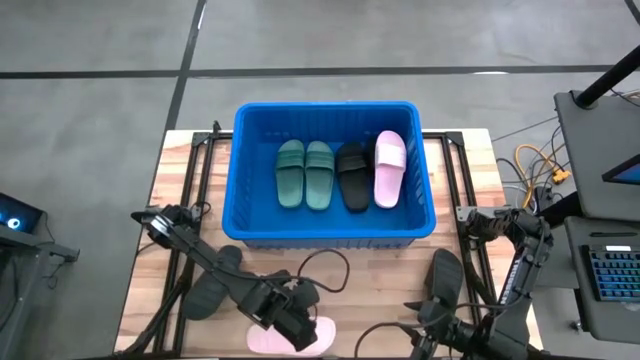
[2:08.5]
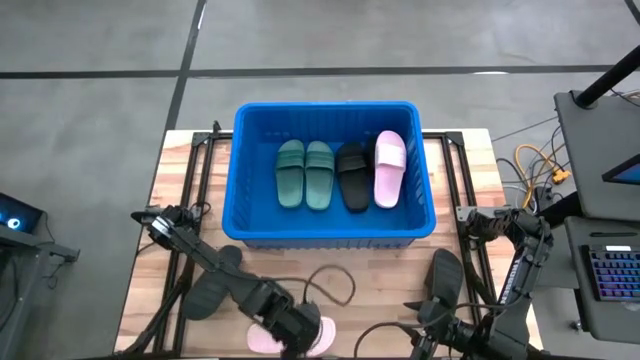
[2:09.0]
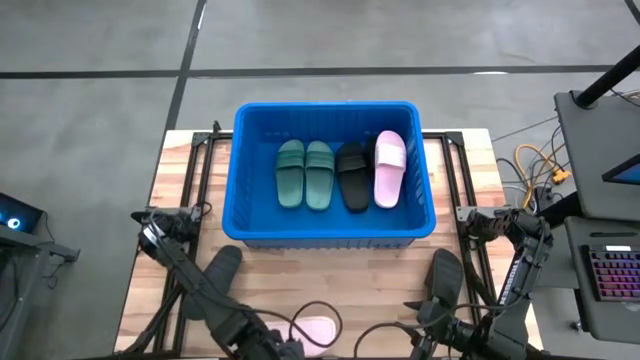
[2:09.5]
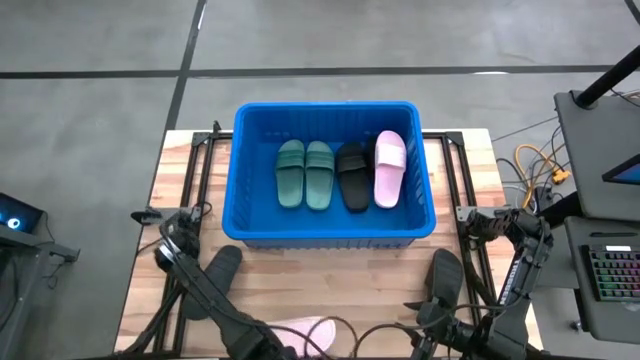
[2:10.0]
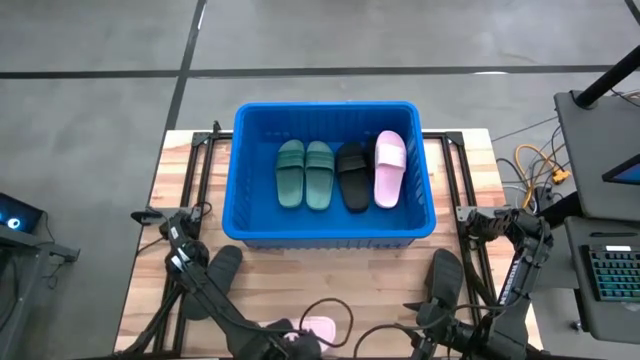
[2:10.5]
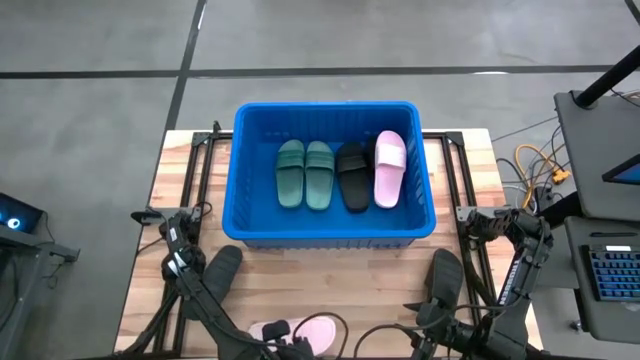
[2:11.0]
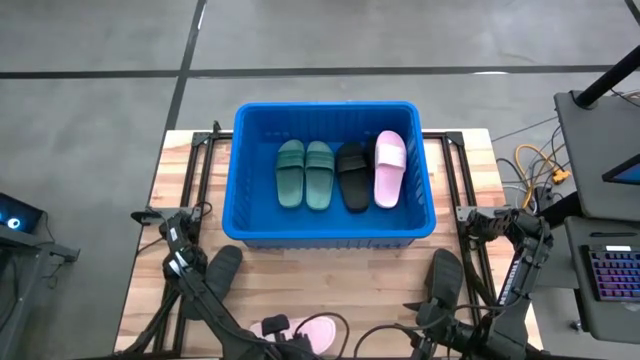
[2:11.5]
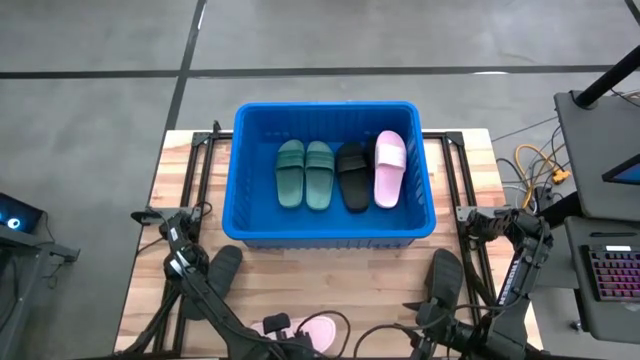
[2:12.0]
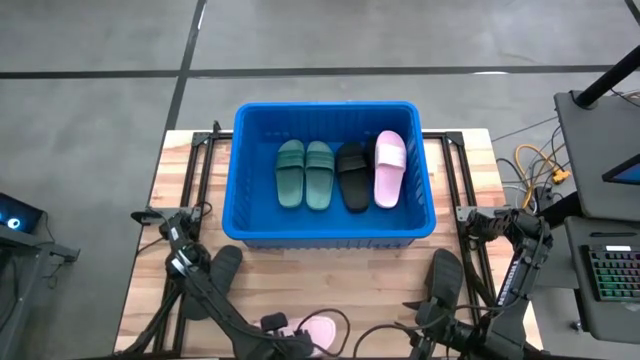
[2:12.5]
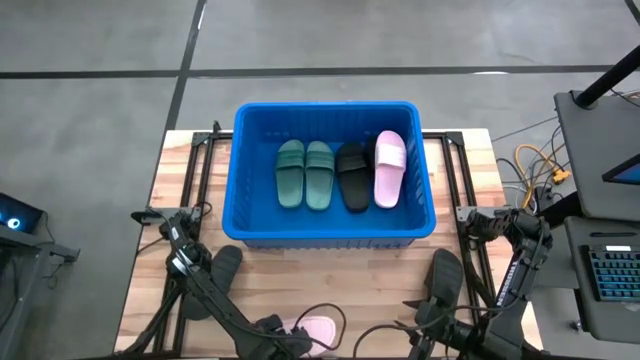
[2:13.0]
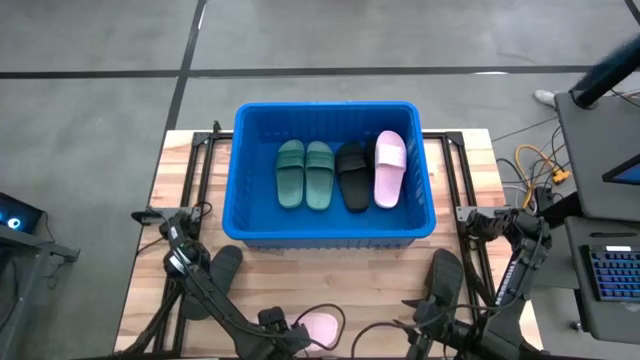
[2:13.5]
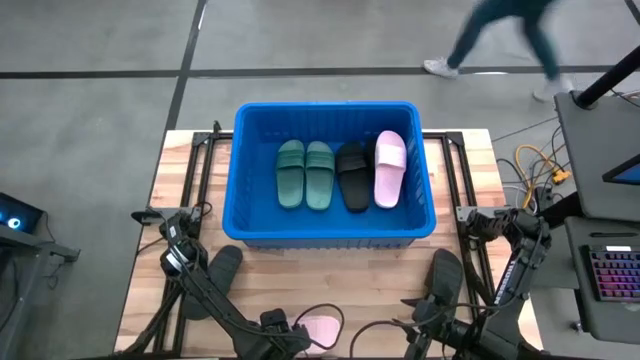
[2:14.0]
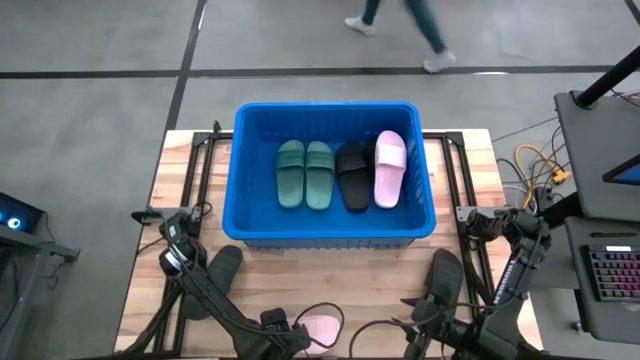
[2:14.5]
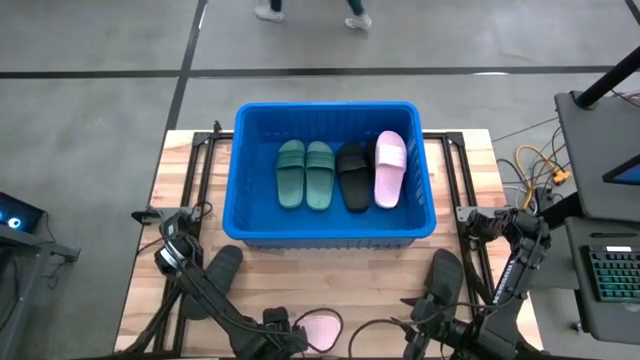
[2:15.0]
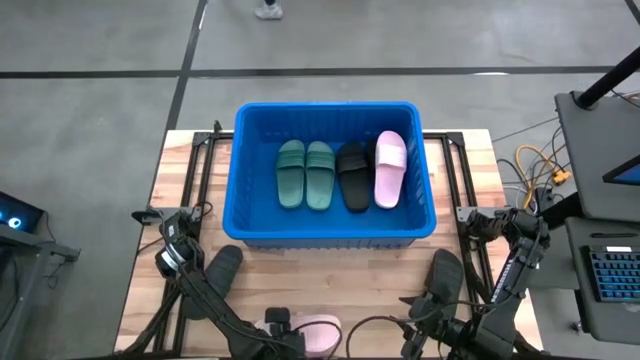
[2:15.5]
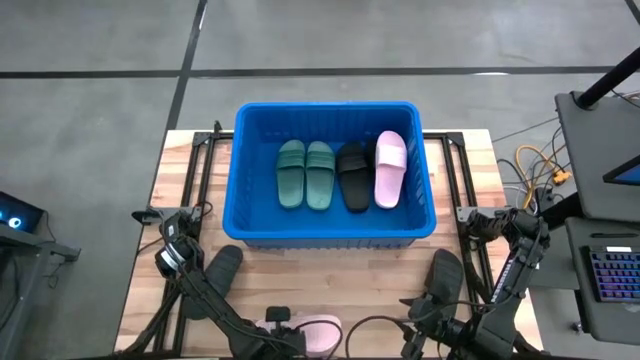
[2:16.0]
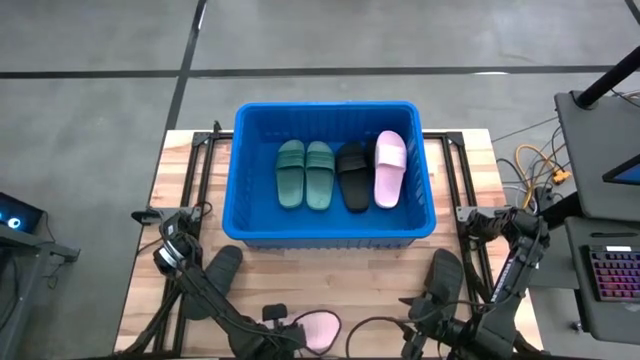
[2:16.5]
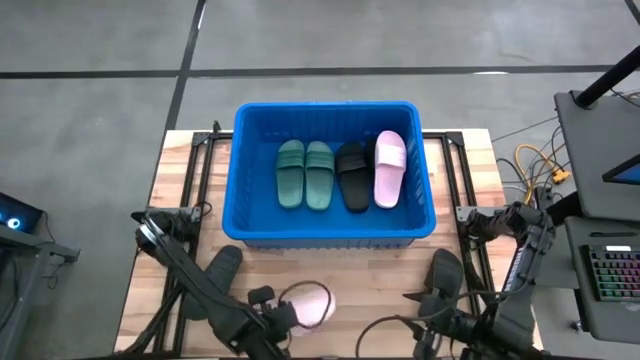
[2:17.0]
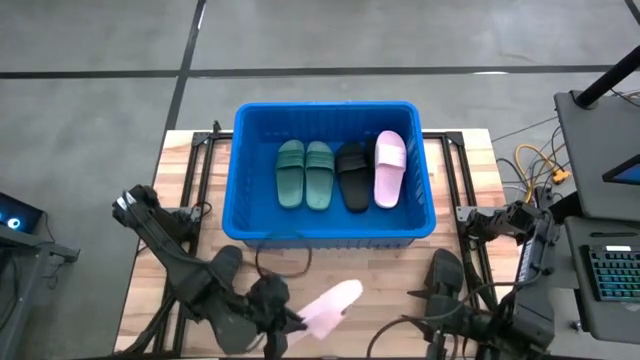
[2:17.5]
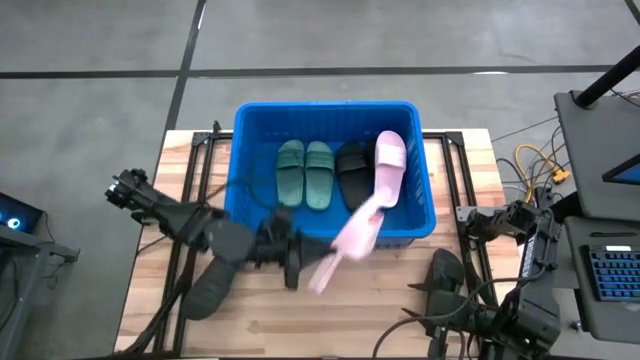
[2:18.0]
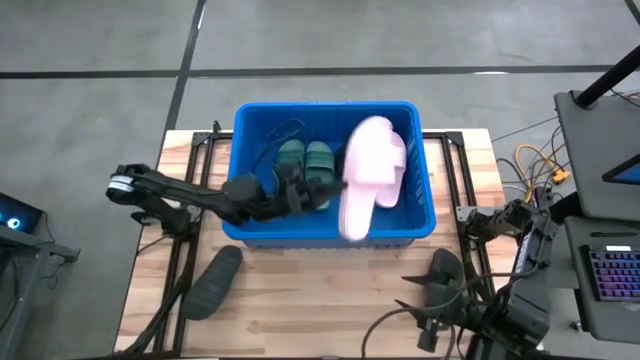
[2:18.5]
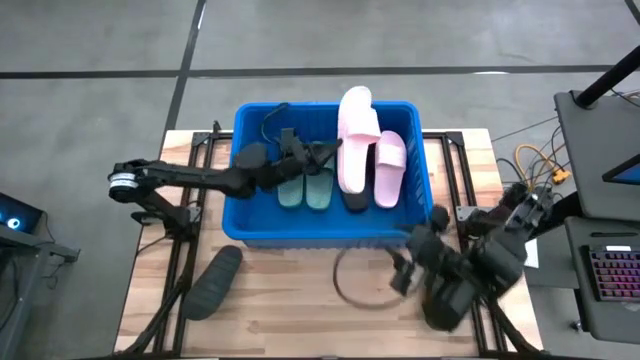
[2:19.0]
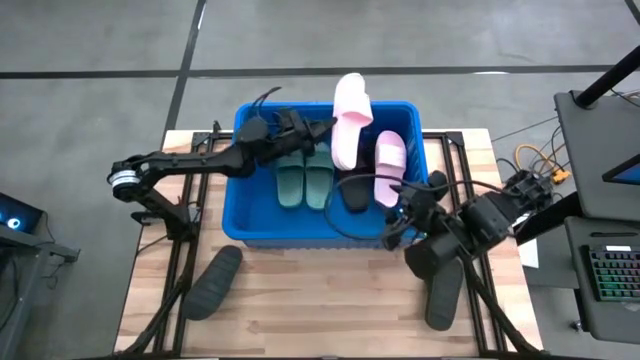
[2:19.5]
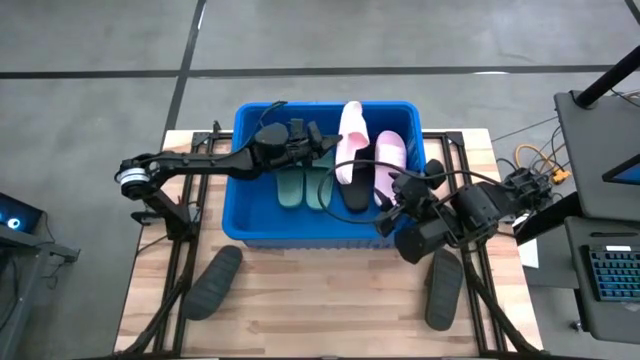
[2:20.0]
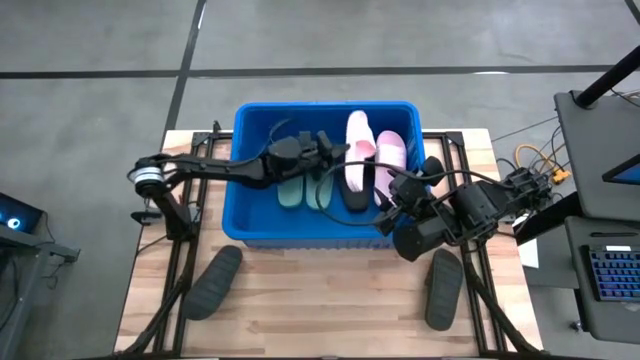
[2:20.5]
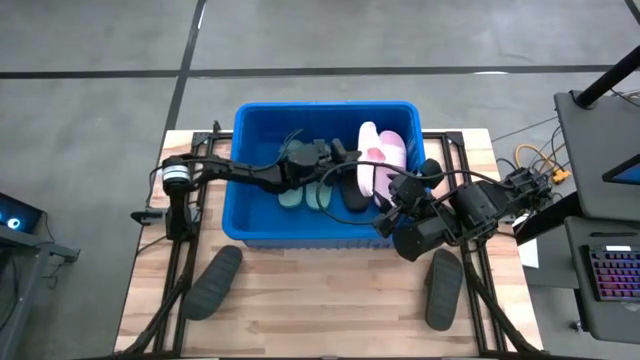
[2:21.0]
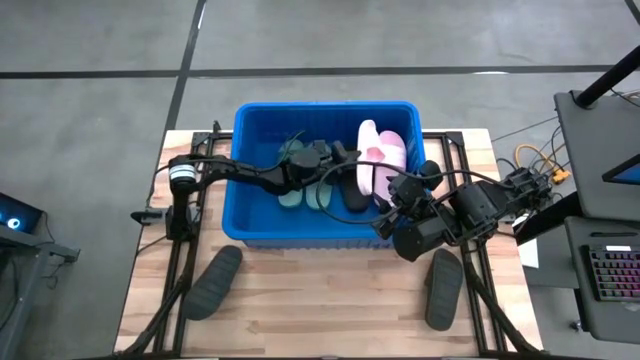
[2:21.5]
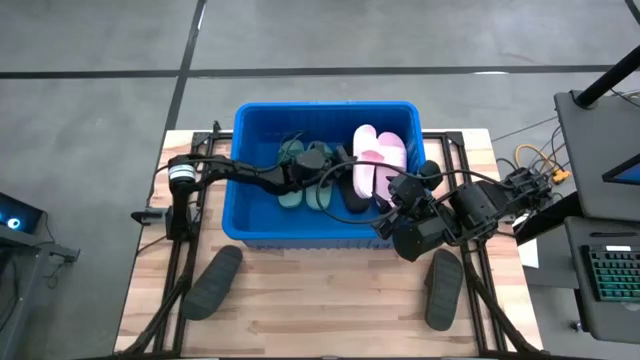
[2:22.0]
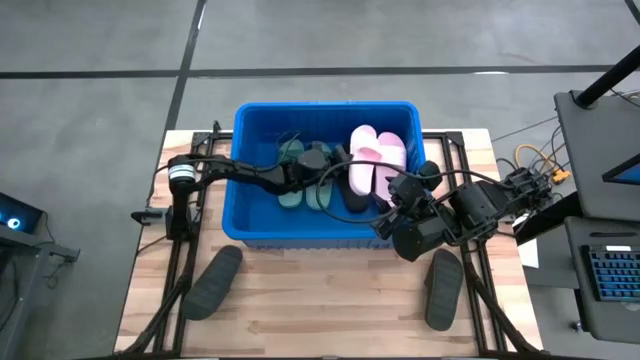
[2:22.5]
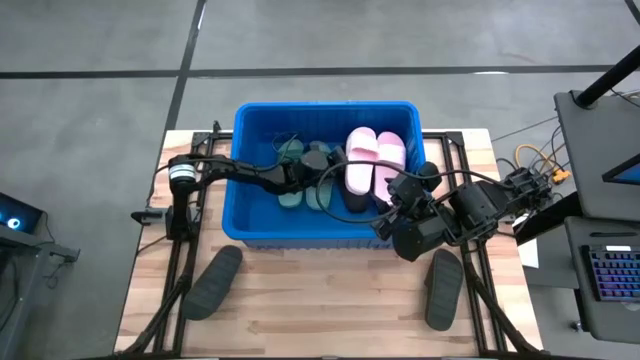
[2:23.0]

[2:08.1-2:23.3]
Task: Pick and place slides into bin
Put the pink slide into the bin

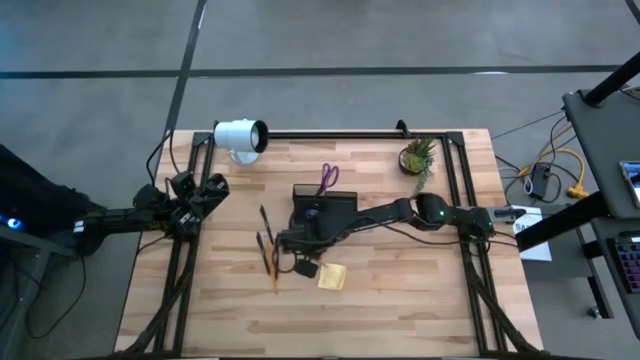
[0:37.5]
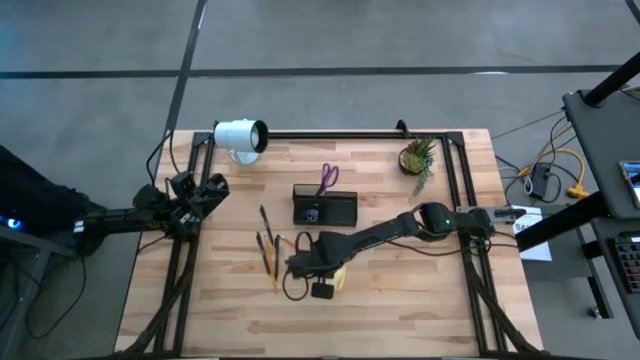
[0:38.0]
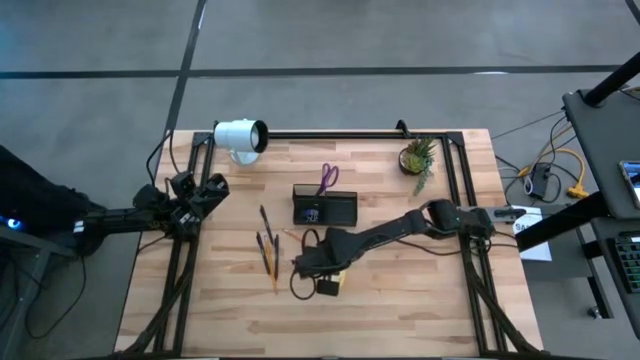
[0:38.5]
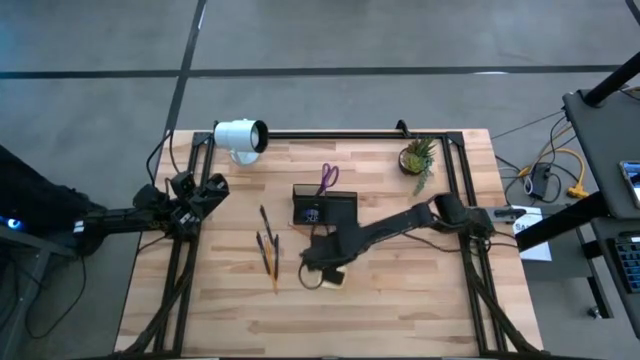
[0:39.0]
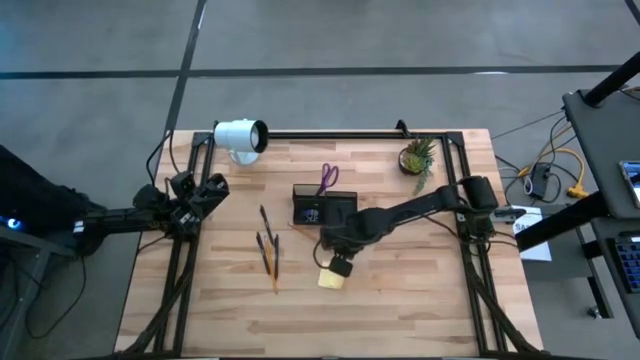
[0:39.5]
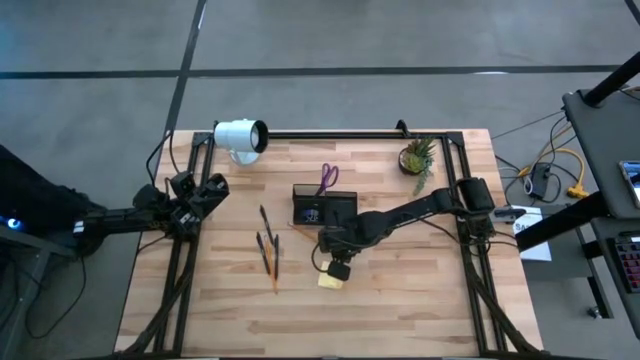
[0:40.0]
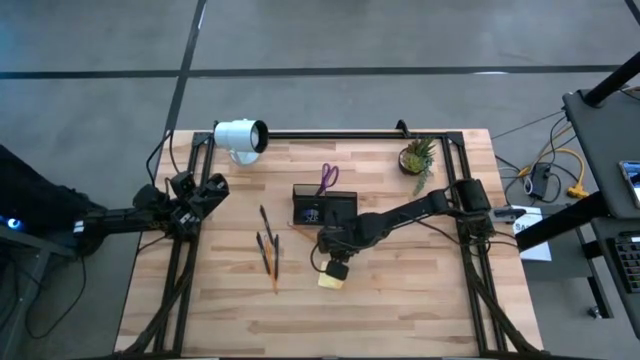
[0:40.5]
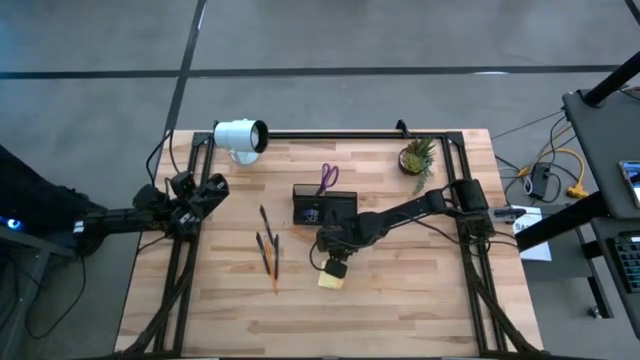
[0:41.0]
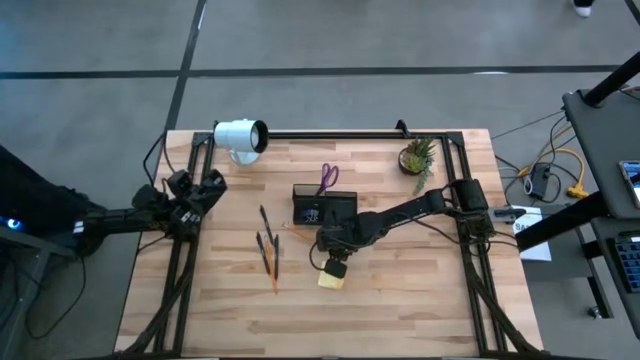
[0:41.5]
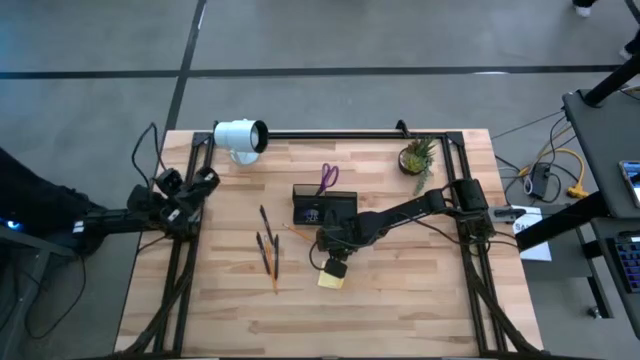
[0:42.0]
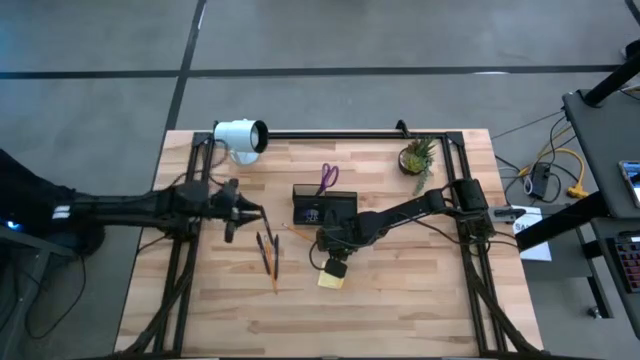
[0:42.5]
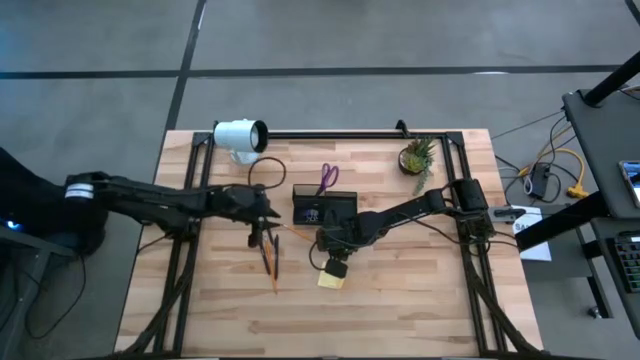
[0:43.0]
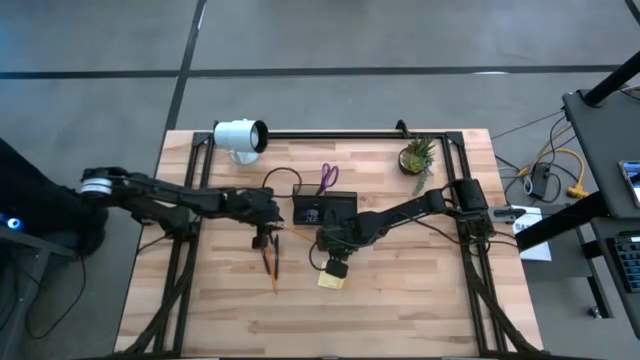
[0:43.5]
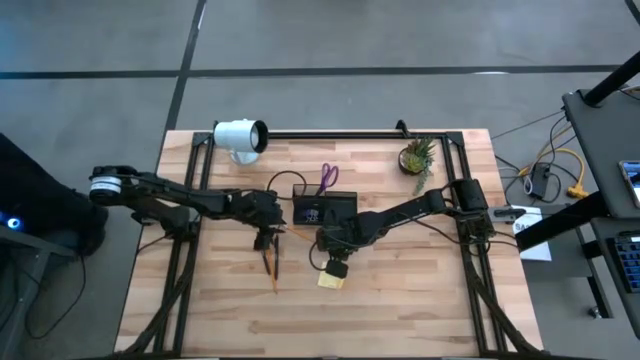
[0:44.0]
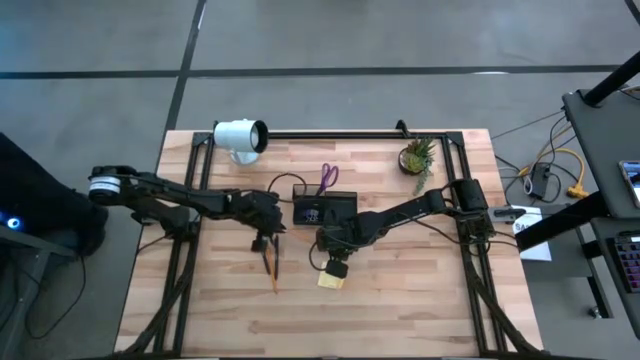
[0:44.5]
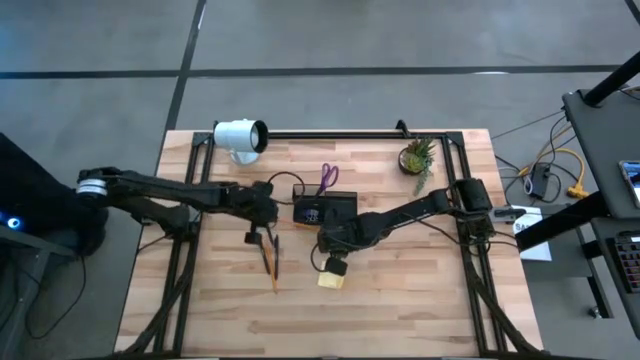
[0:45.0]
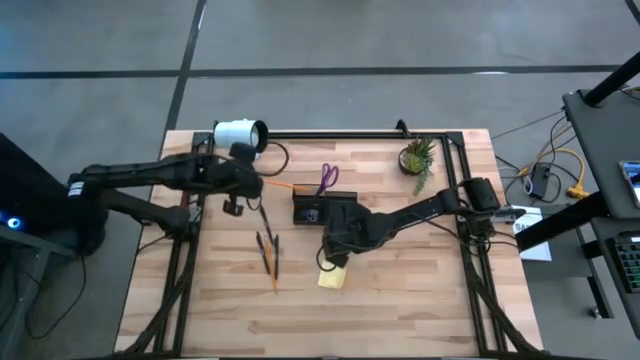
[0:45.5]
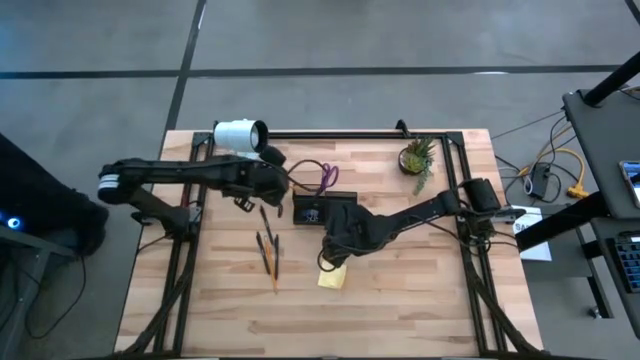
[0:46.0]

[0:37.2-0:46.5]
Task: Pick and place office supplies into organizer
Put the right orange pencil into the black desk organizer
